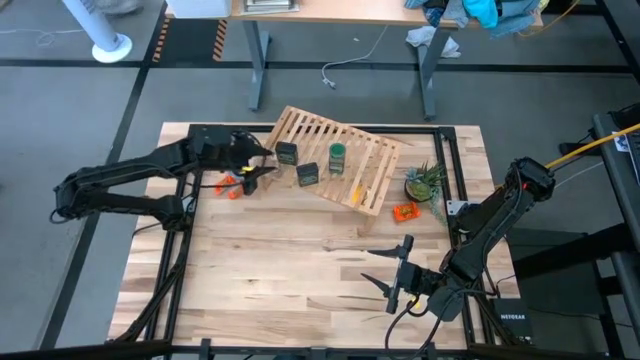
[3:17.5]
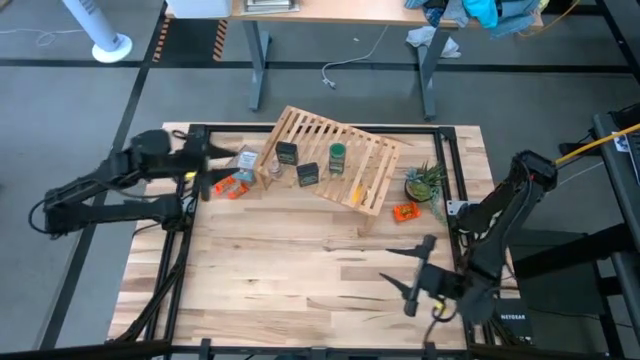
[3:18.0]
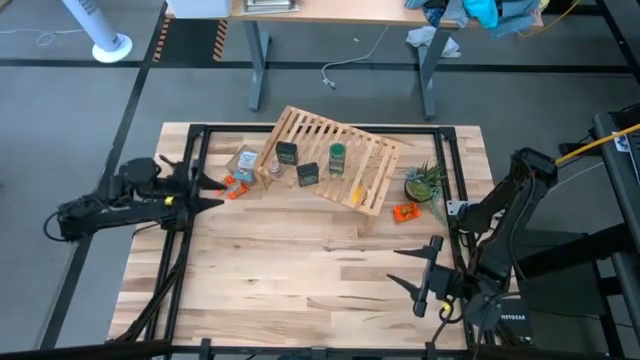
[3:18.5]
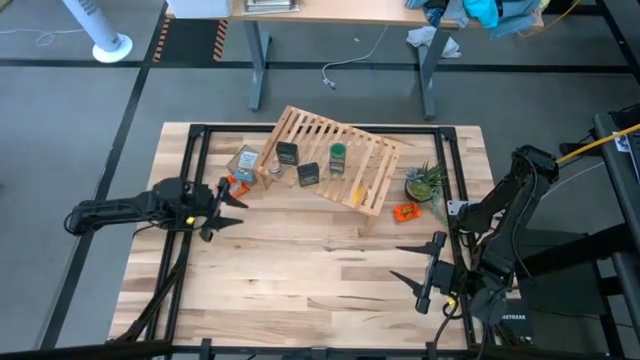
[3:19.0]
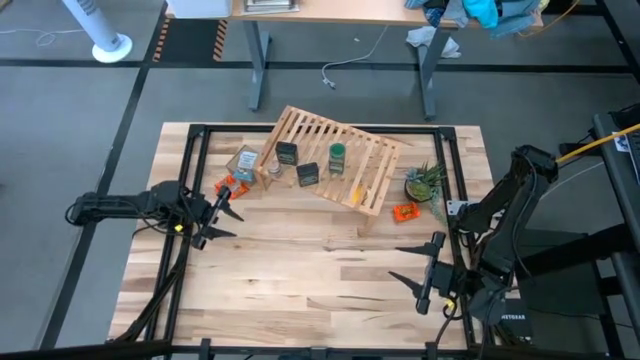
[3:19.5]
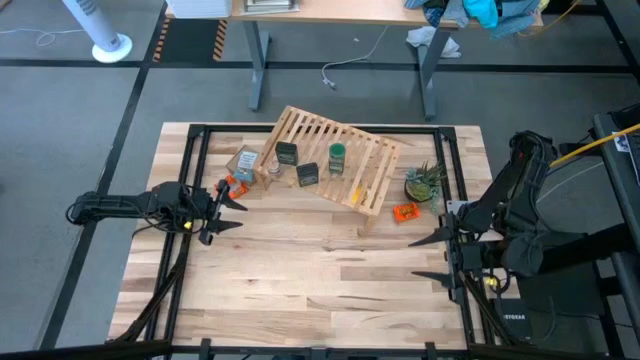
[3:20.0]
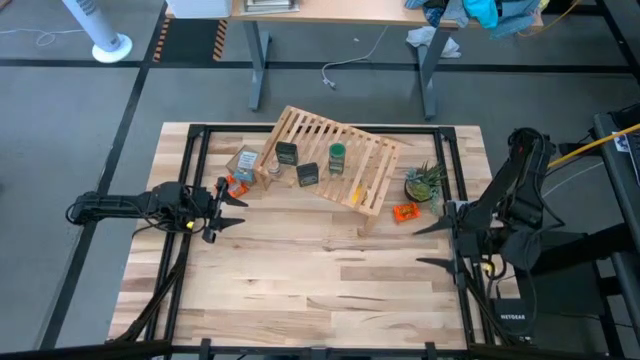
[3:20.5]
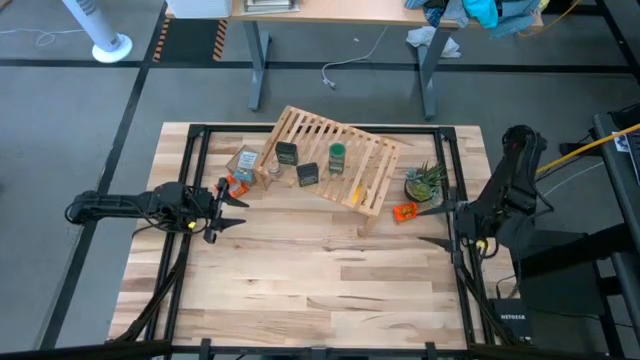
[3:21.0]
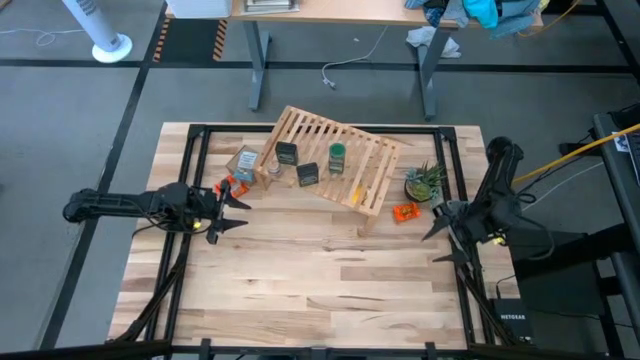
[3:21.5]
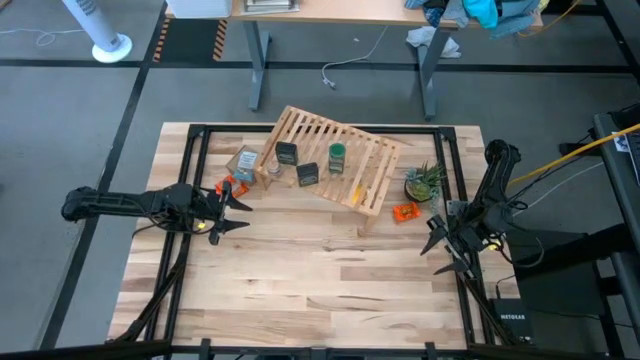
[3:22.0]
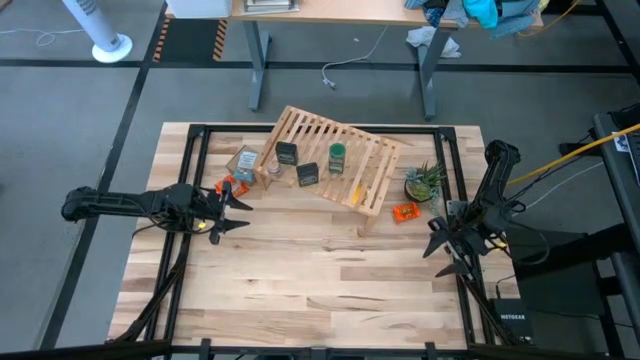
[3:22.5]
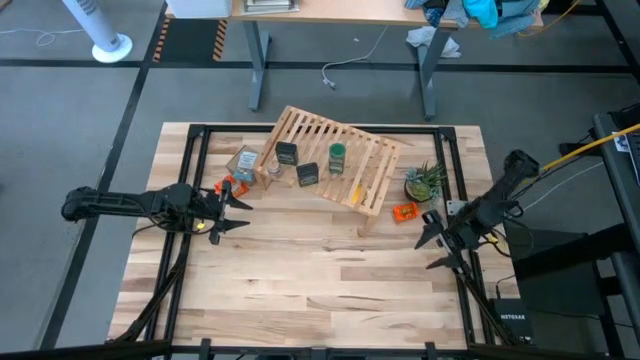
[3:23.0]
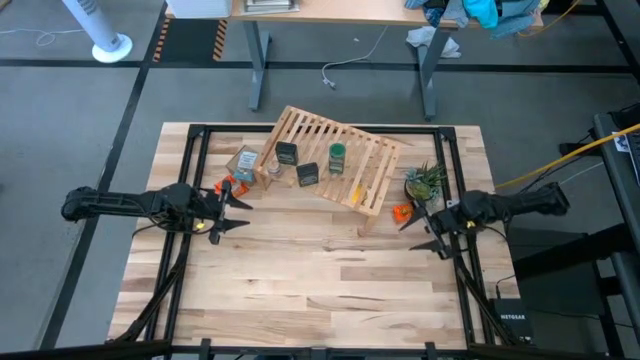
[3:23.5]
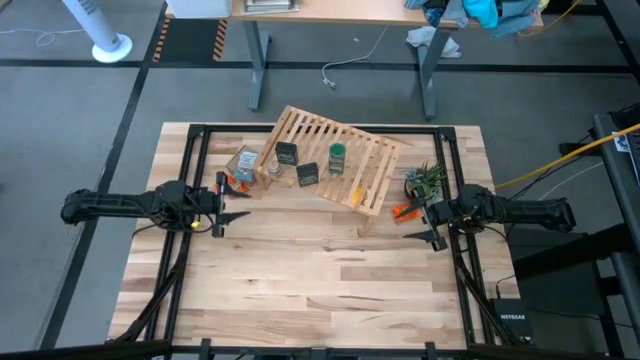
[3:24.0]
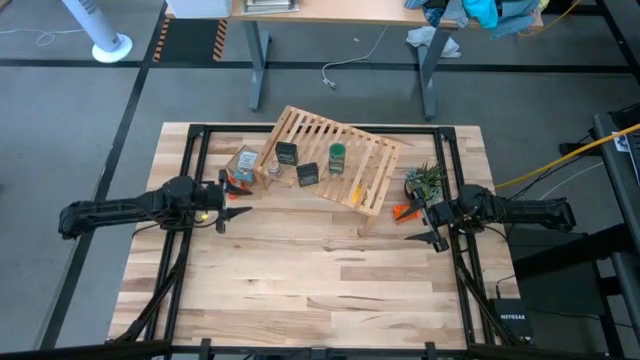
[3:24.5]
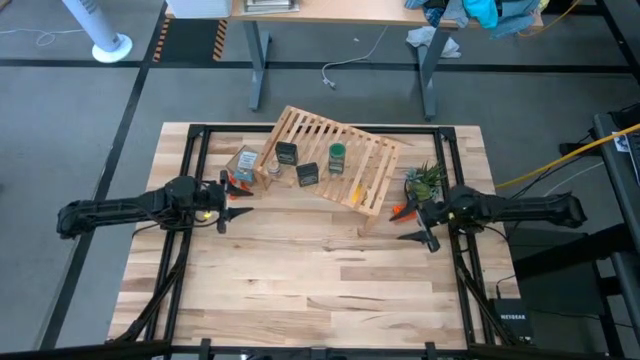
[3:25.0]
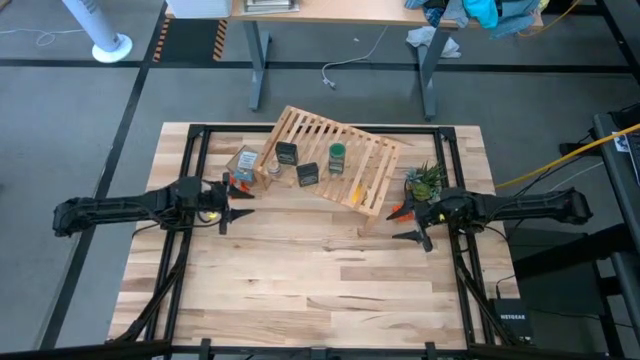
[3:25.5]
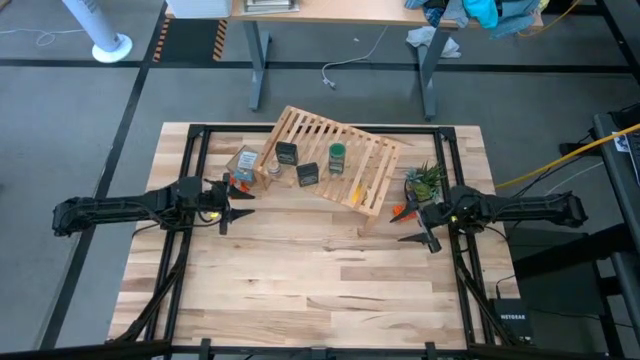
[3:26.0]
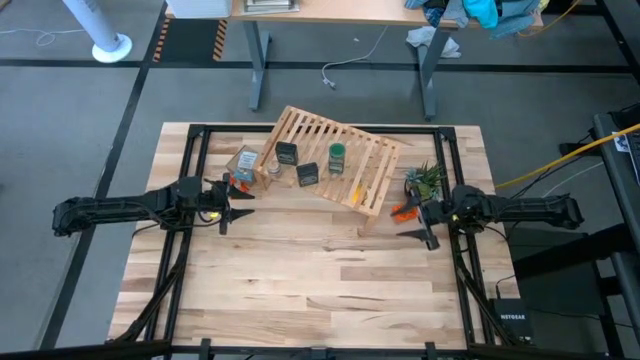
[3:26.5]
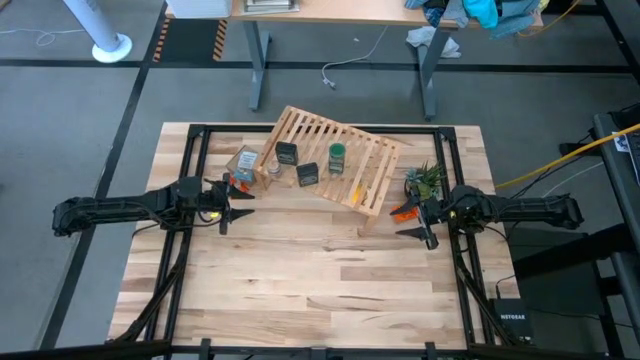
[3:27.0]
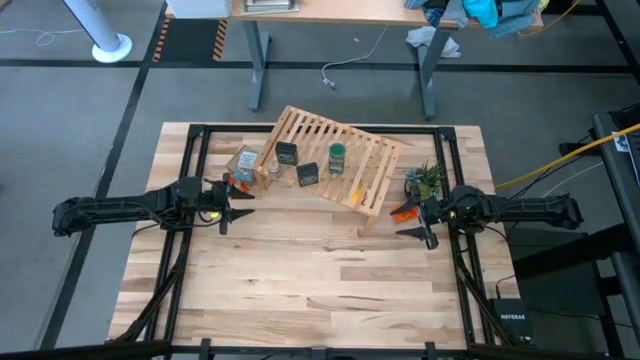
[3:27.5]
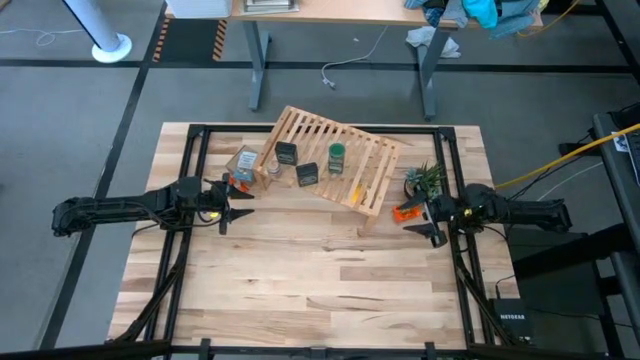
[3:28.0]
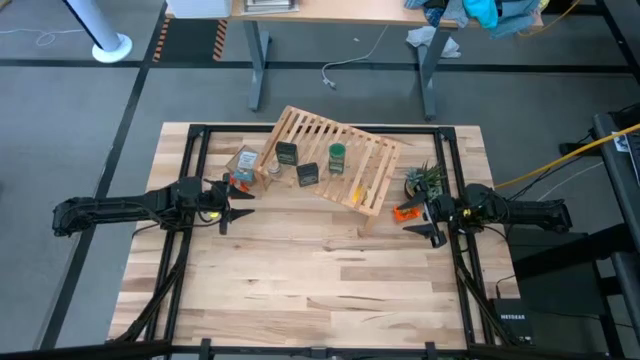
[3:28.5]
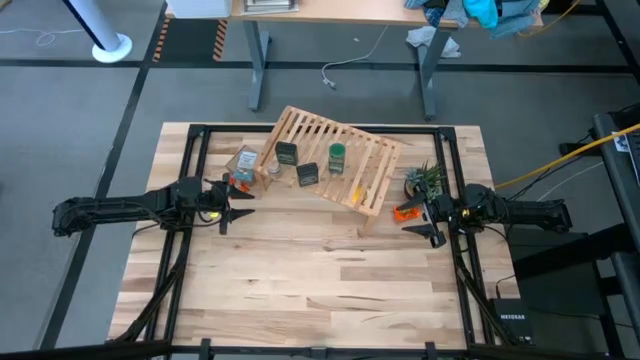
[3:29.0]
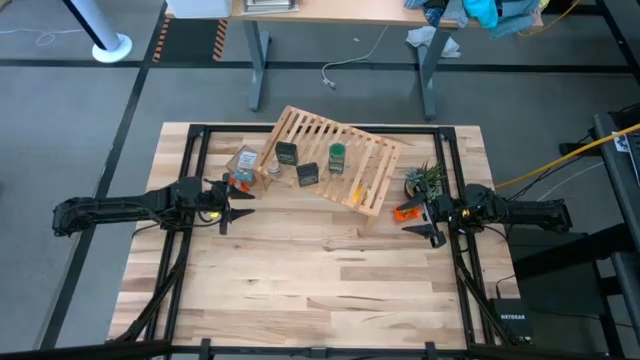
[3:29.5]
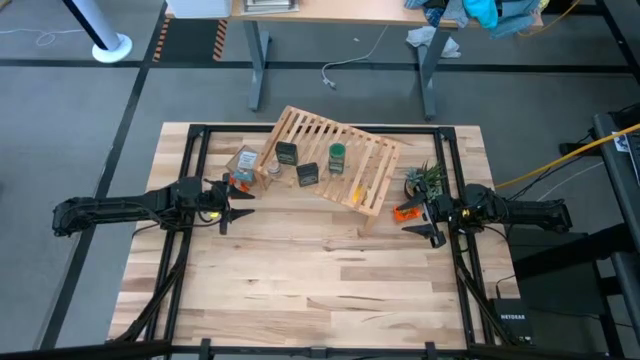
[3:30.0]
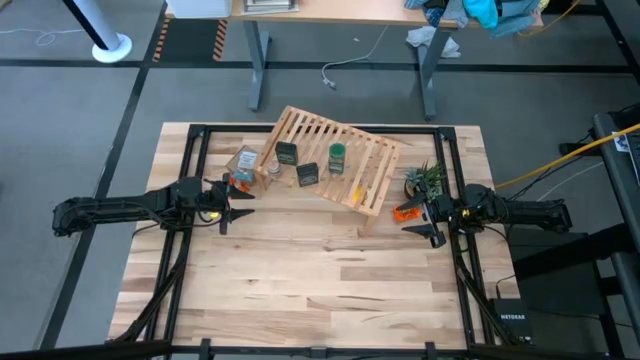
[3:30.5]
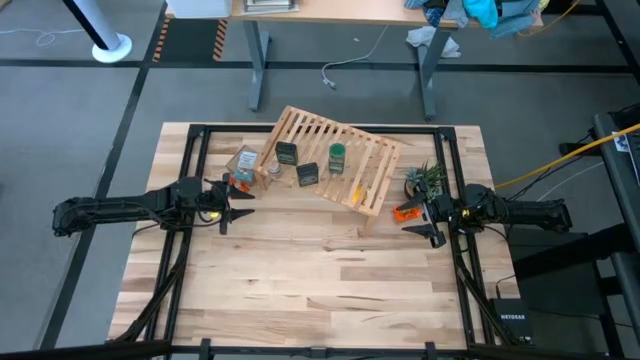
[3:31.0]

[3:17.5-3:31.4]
Task: Shelf spices
Return to Home Position

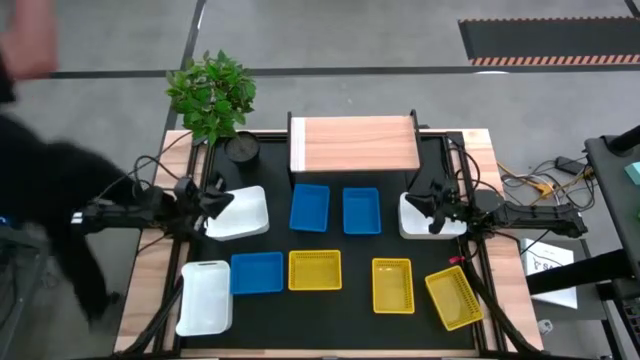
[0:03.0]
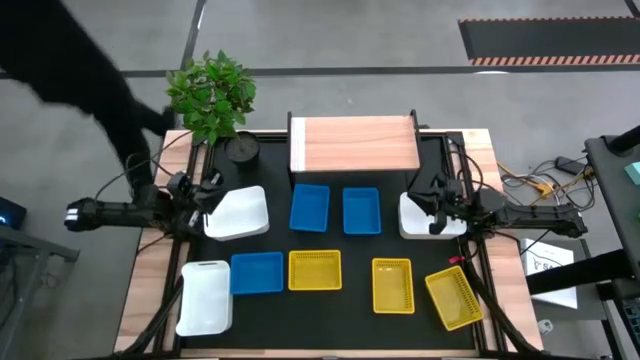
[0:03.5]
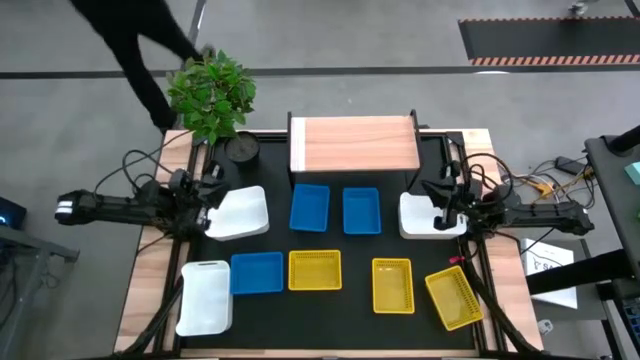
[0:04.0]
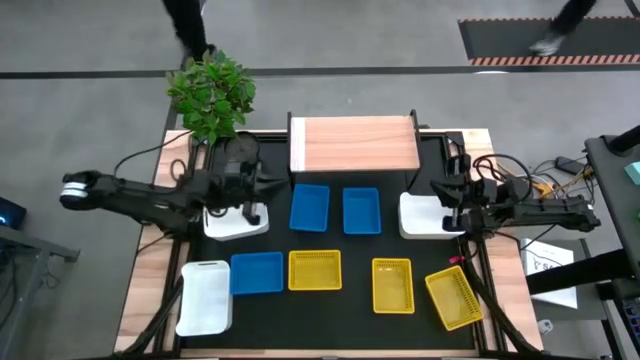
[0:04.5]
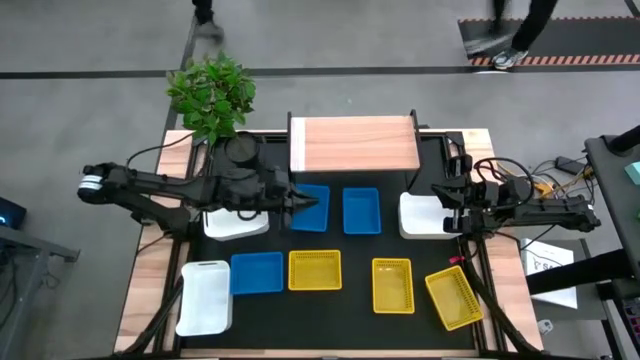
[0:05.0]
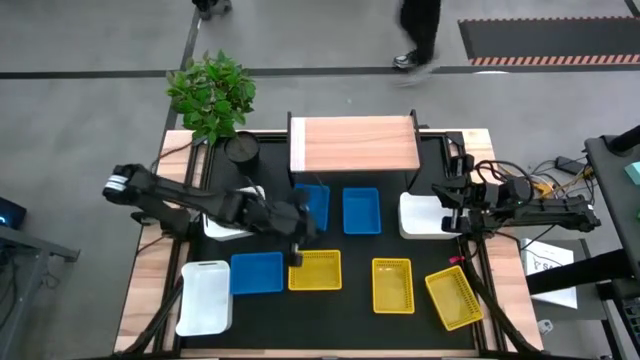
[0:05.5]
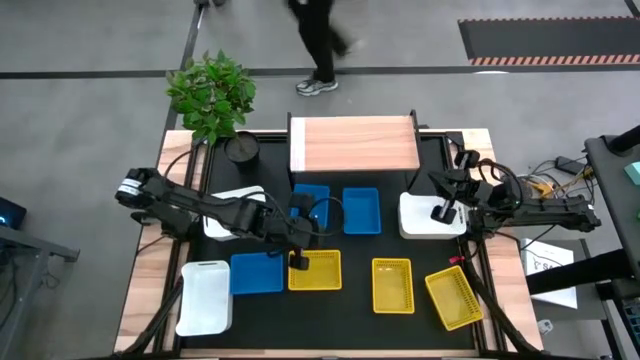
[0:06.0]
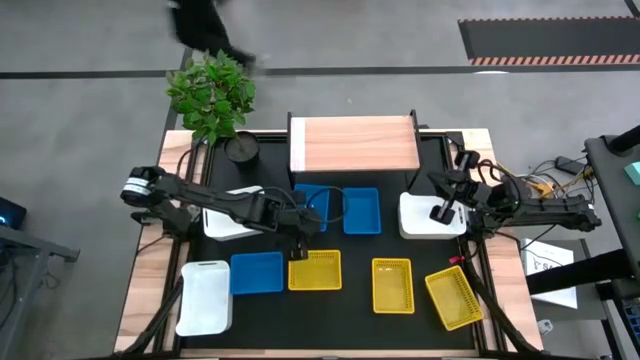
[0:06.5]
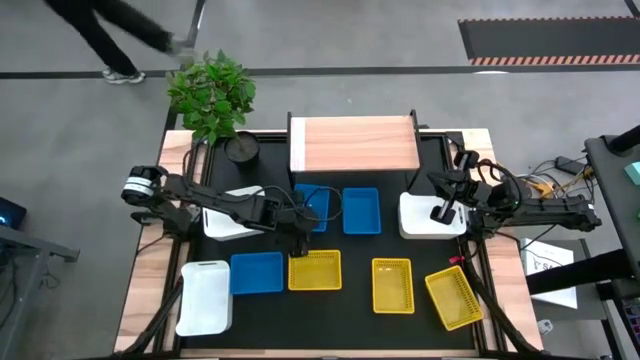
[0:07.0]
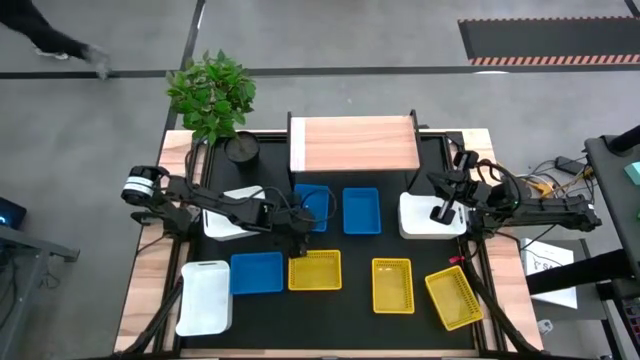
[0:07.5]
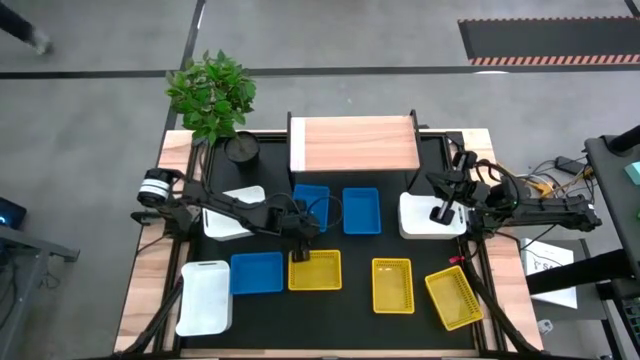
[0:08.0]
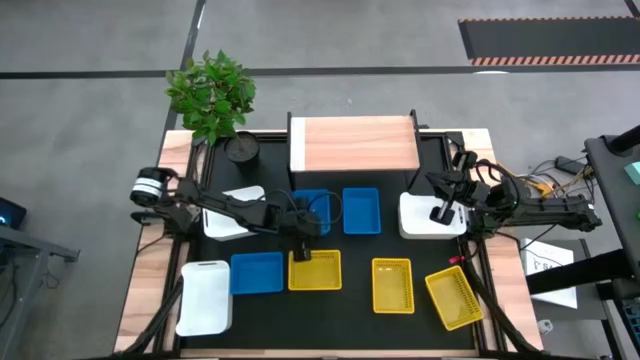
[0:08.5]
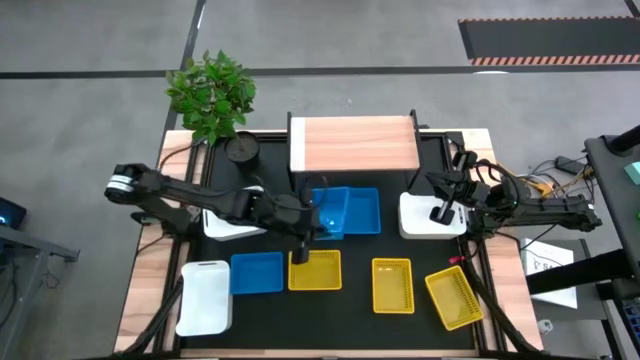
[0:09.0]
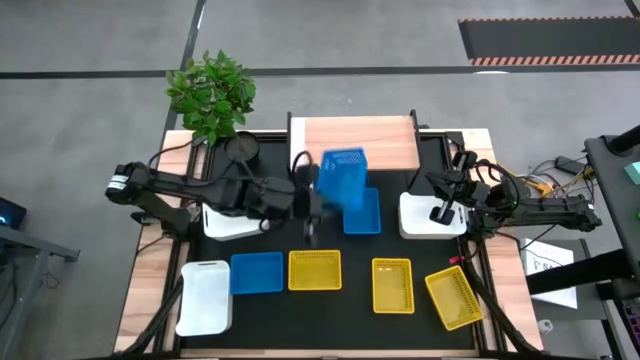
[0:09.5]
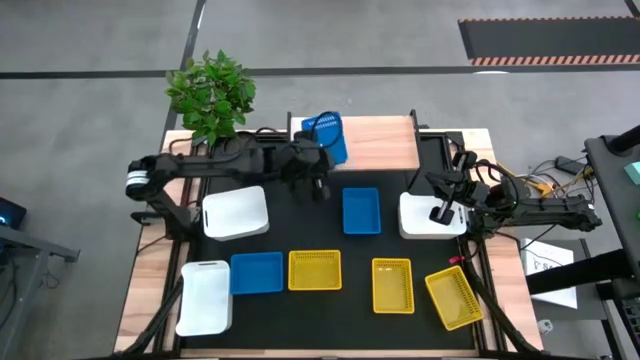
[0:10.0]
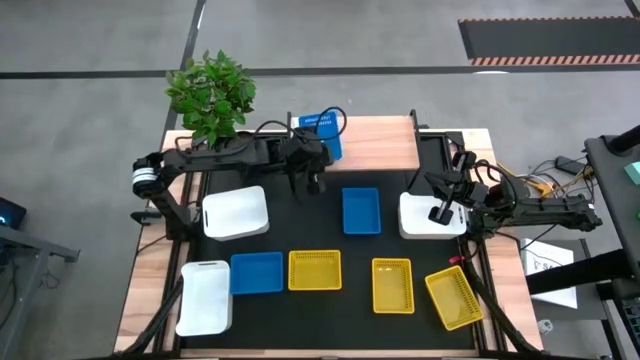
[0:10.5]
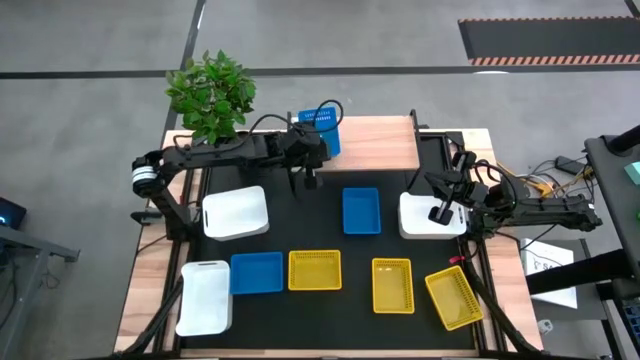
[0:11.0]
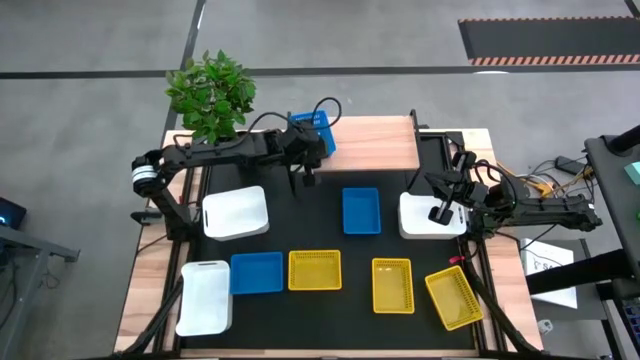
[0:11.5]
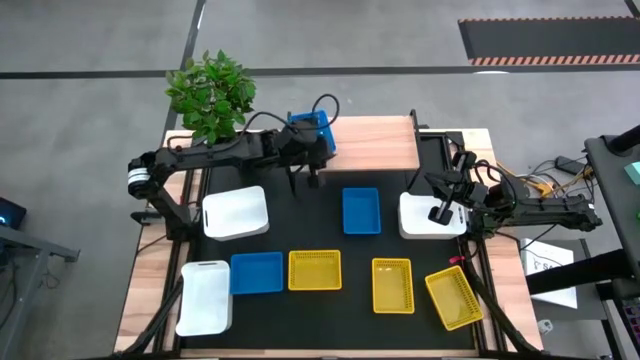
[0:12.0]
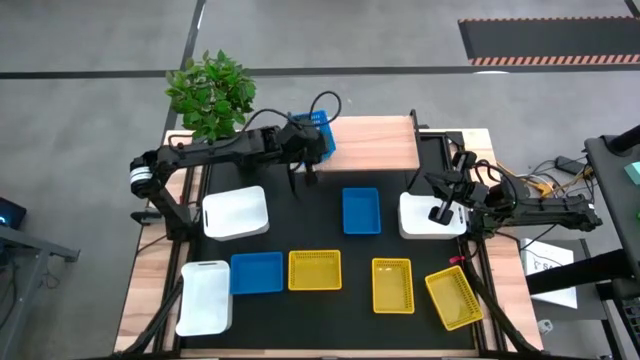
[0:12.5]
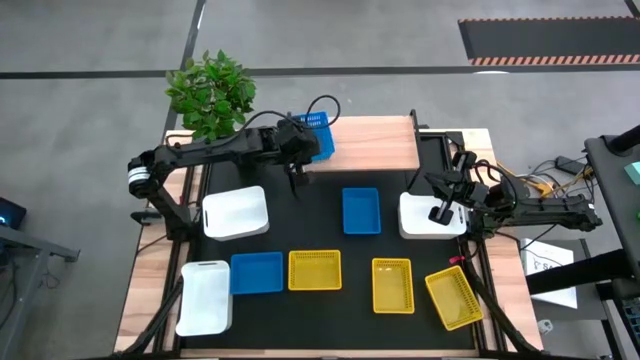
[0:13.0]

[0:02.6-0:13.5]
Task: Stack baskets on shelf by color
Put the top left blue bin on the shelf
